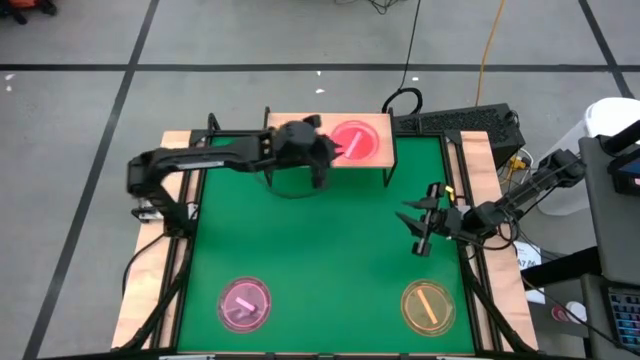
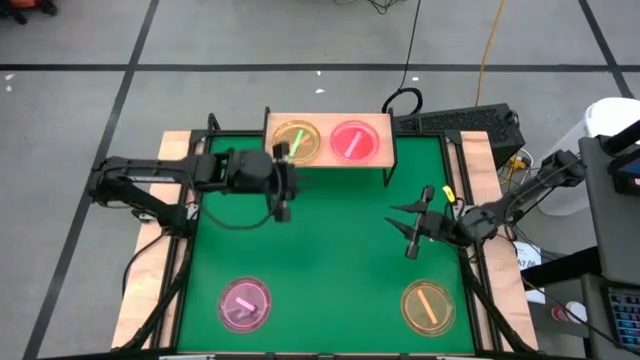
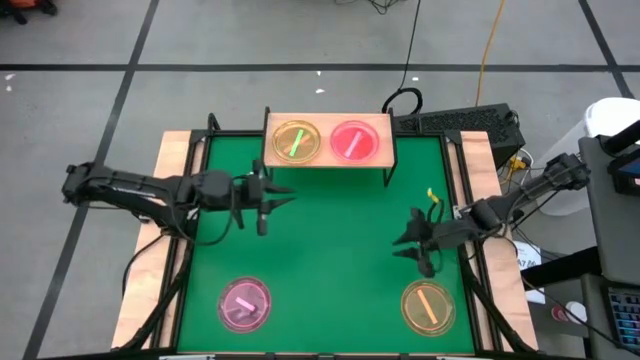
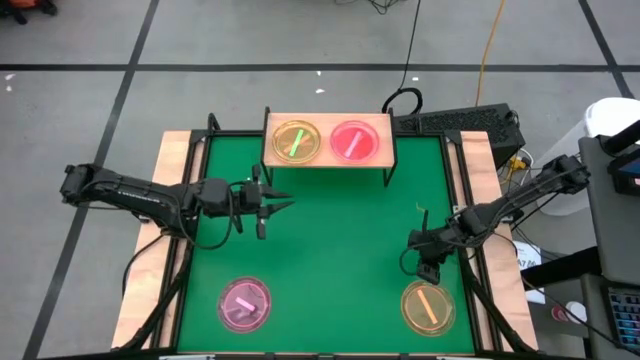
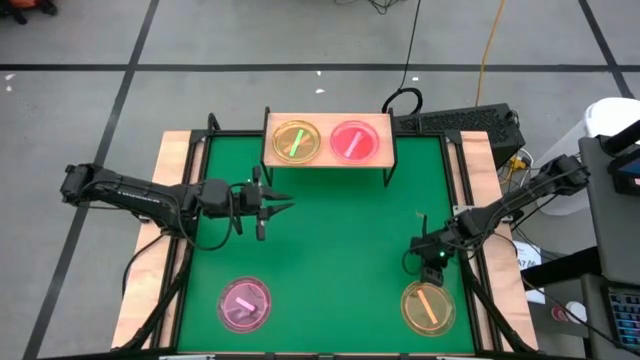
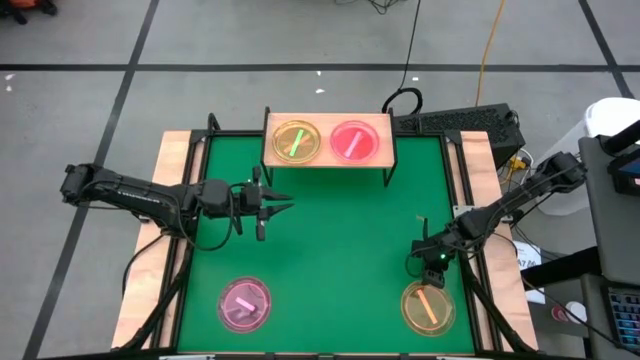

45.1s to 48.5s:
Task: Place and stack plates onto a shelf
Stack the orange plate on top of the pink plate on the shelf

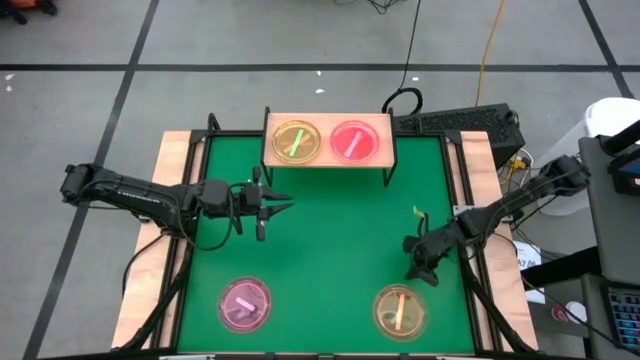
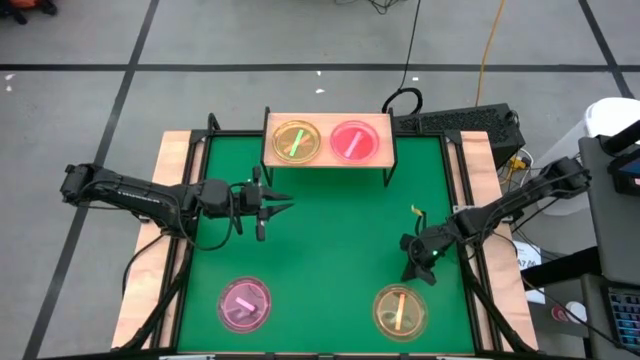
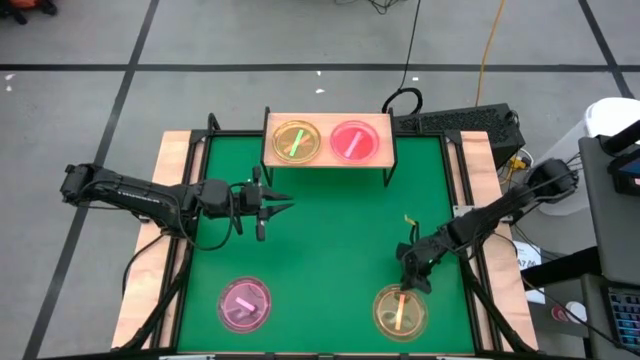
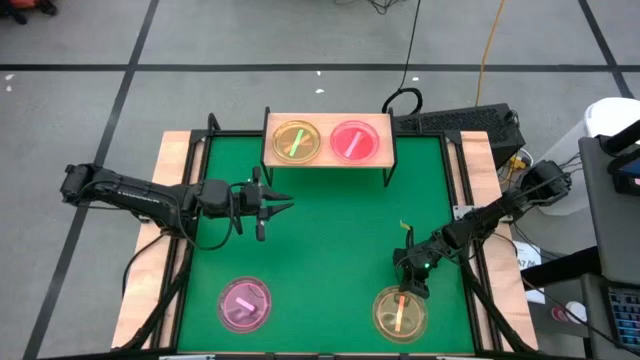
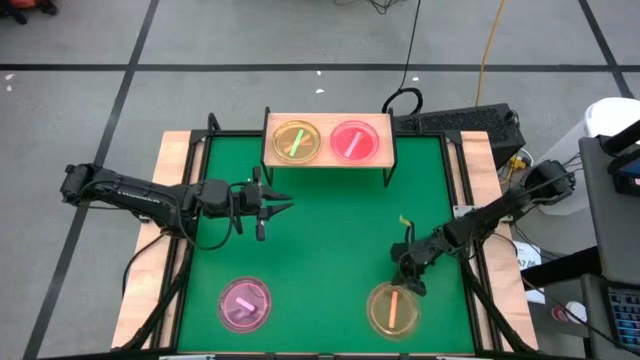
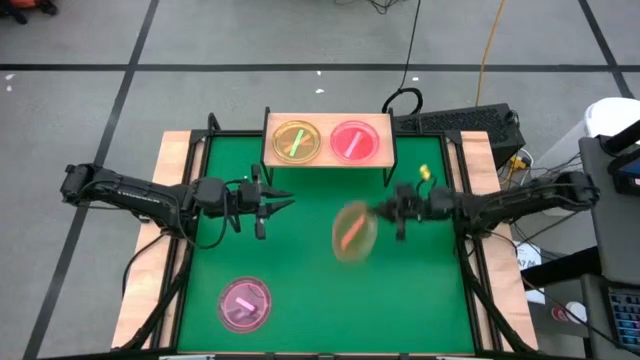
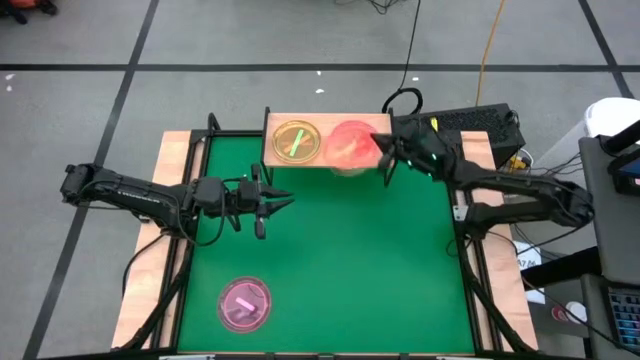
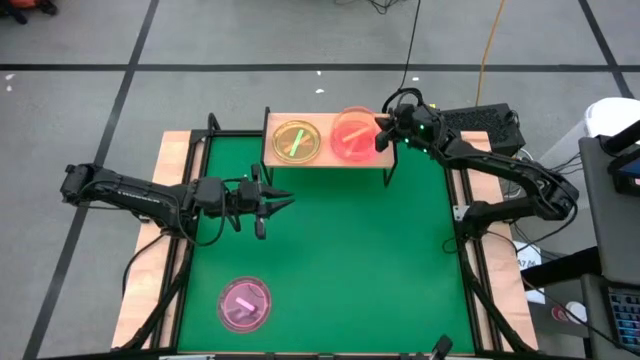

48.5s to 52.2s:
Stack the orange plate on top of the pink plate on the shelf

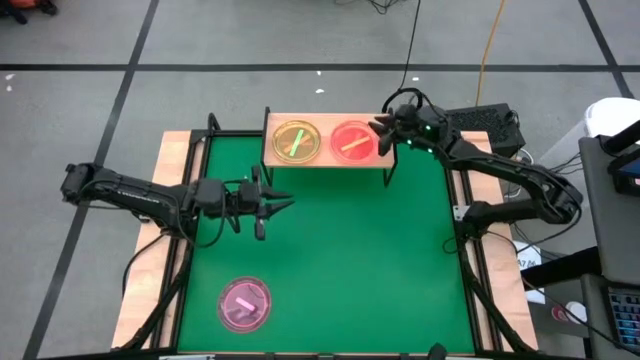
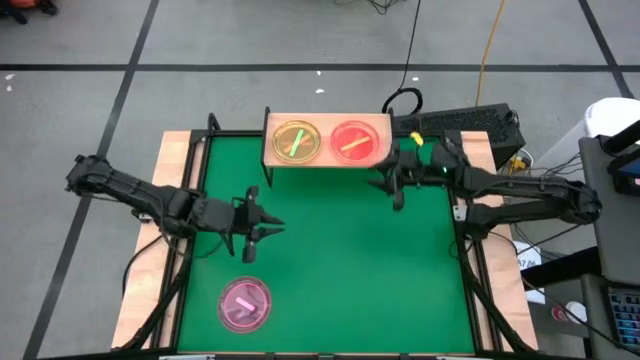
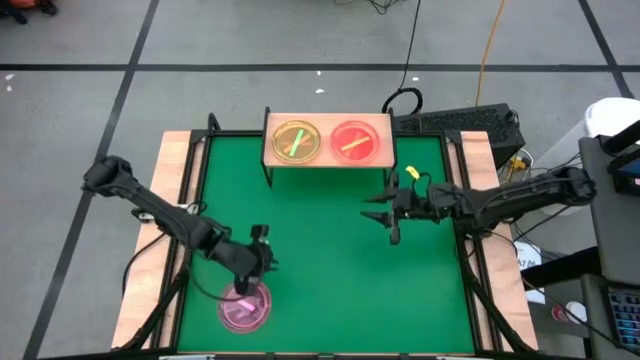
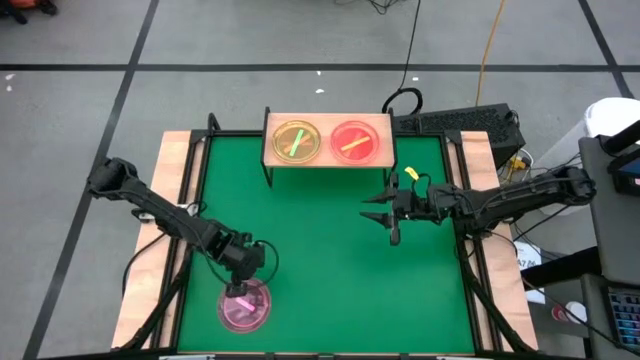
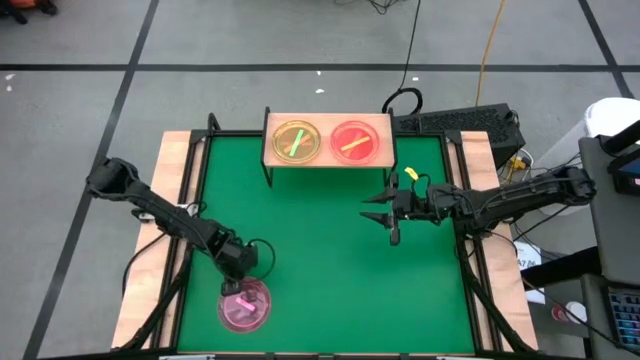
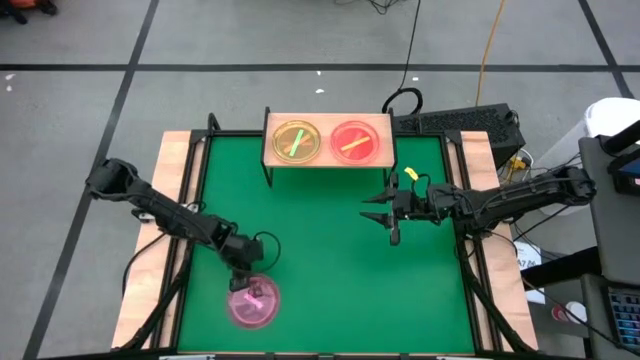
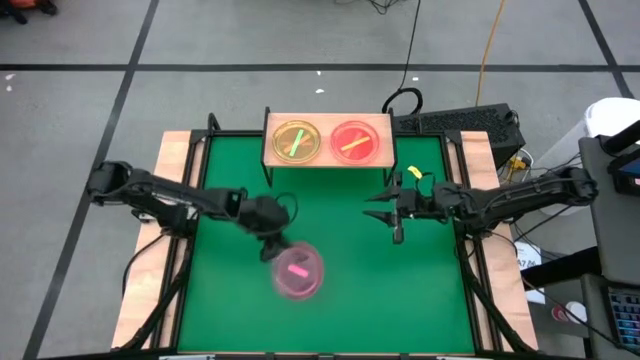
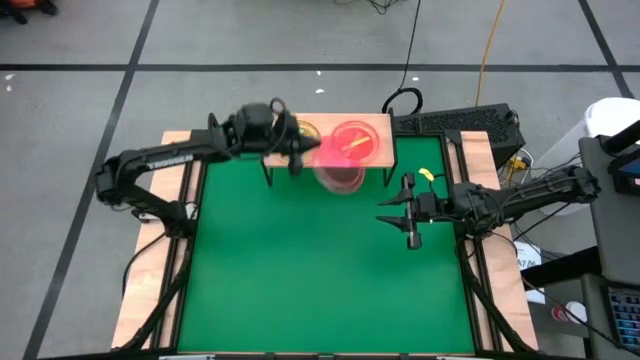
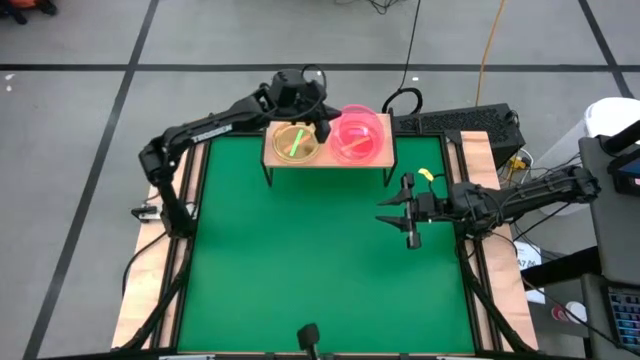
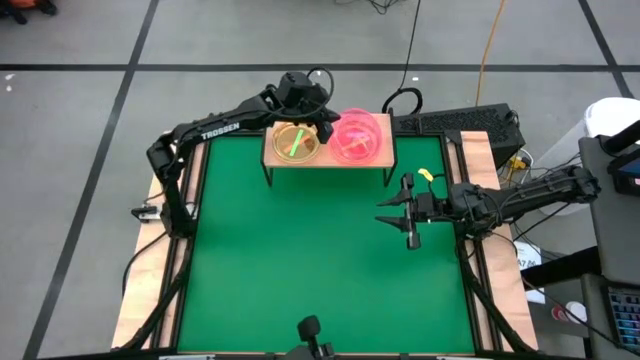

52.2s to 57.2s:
Stack the pink plate on top of the orange plate on the shelf

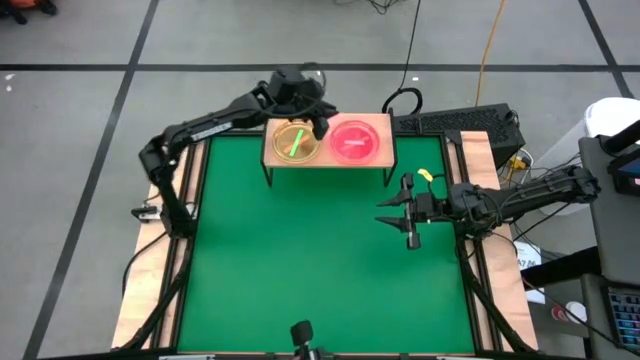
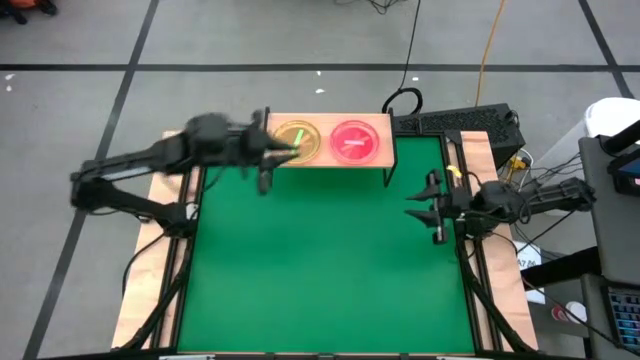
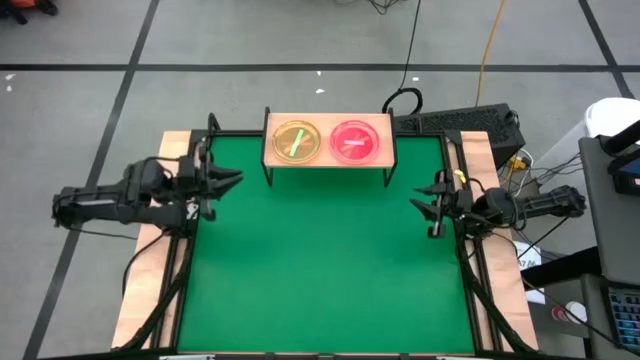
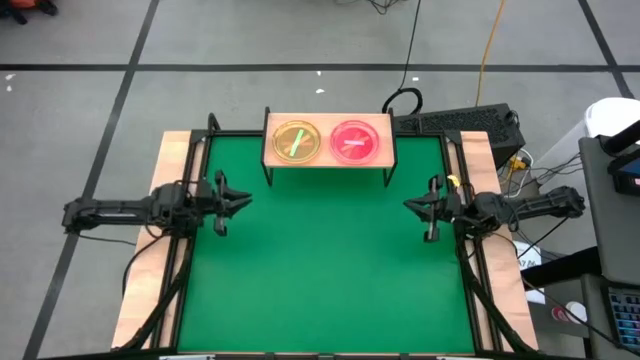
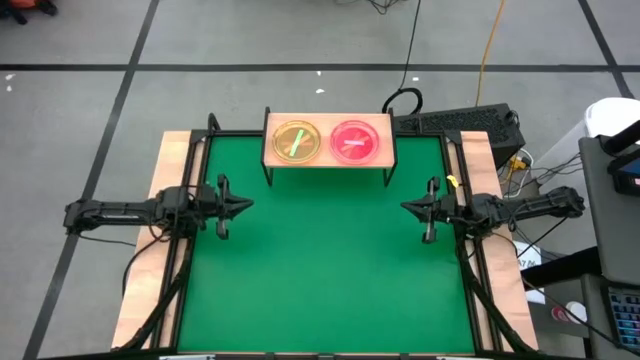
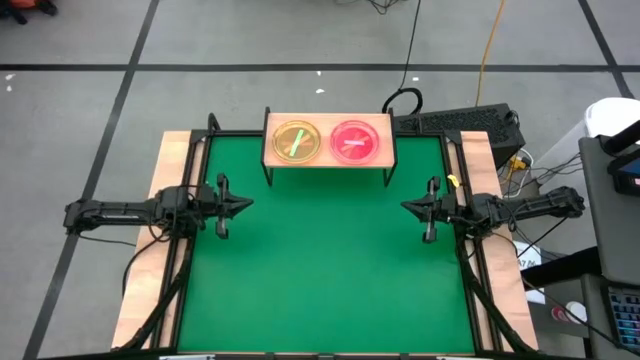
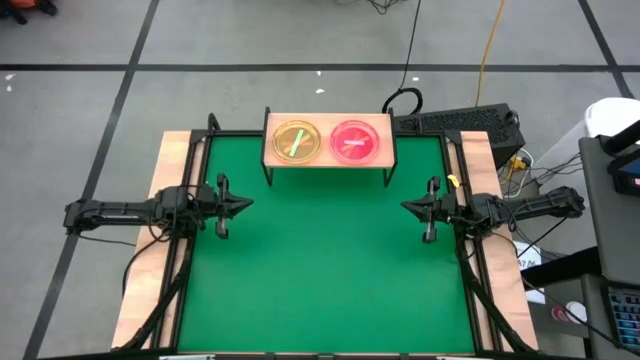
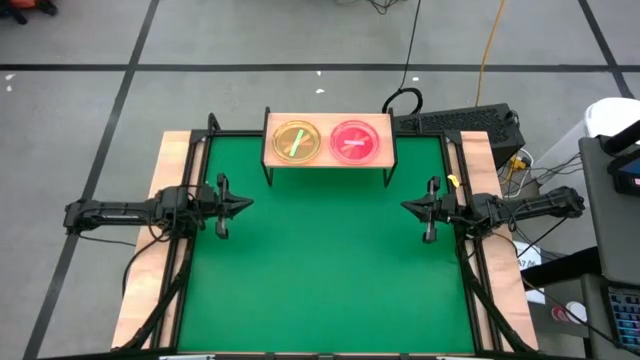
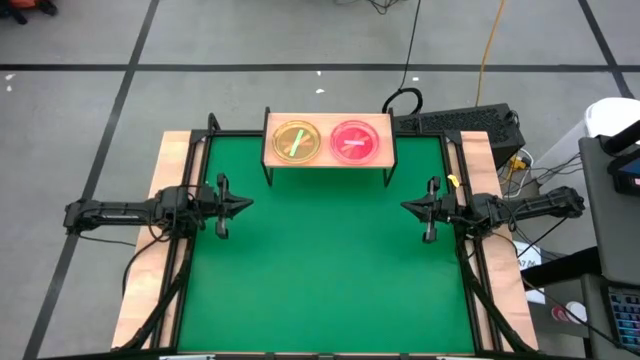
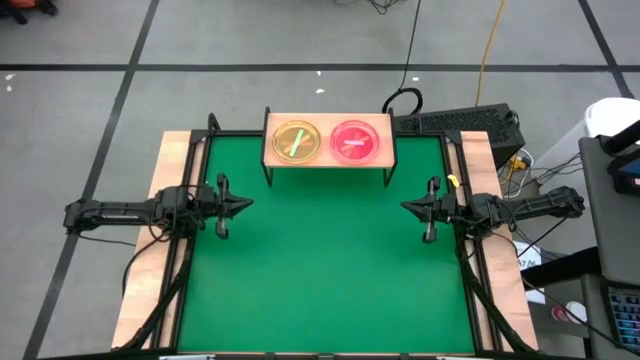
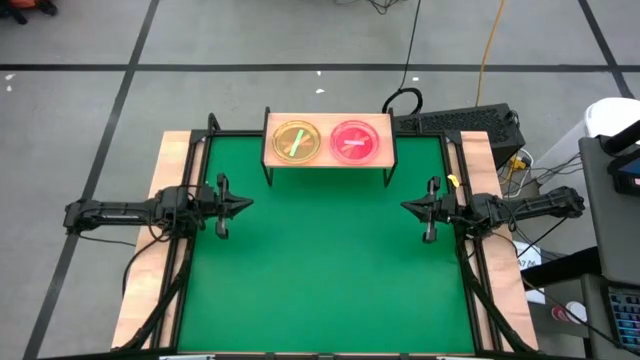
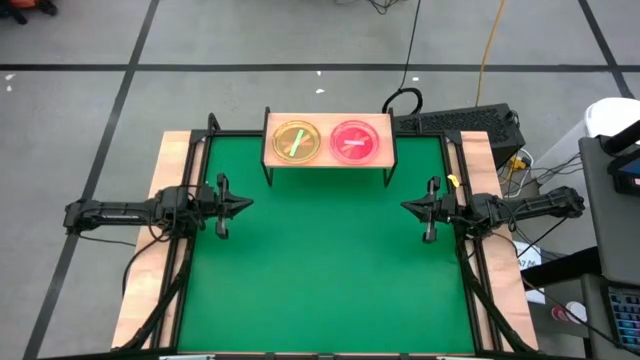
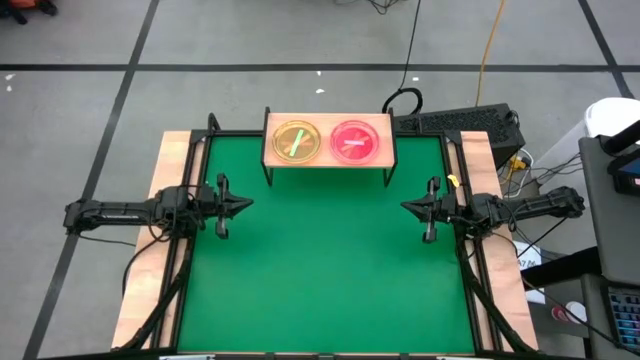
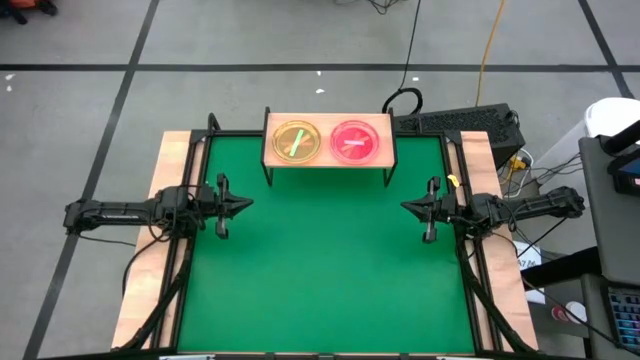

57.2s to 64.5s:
Return to Home Position

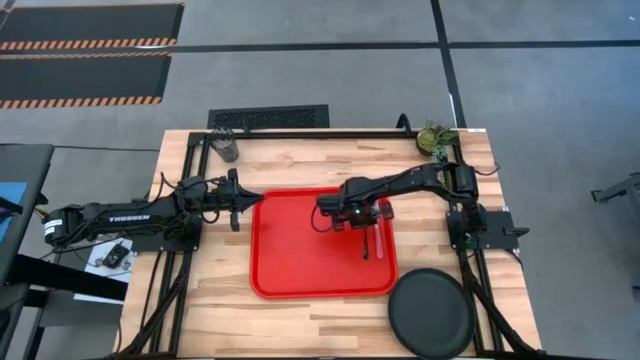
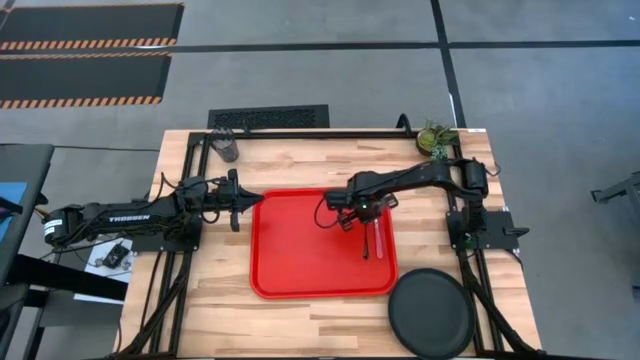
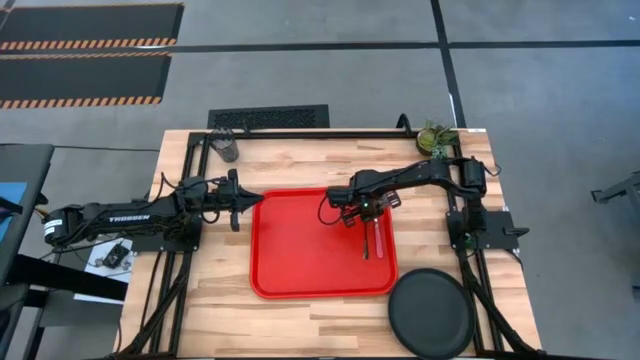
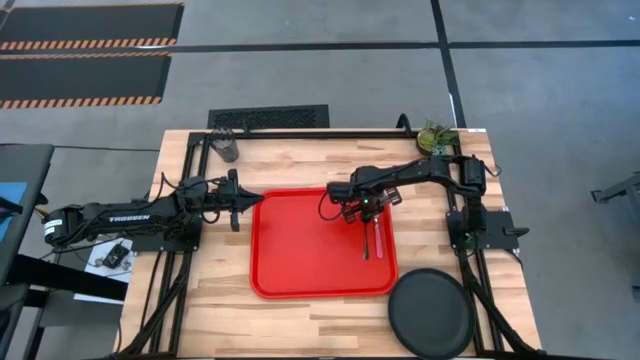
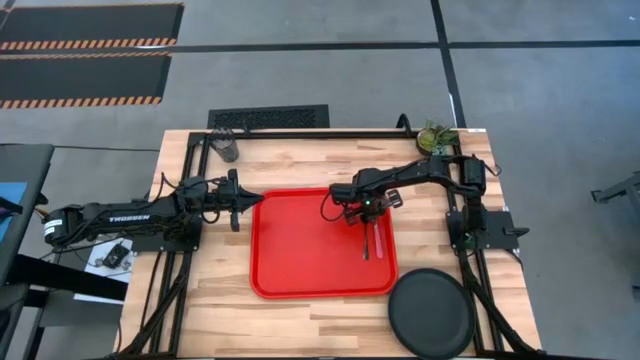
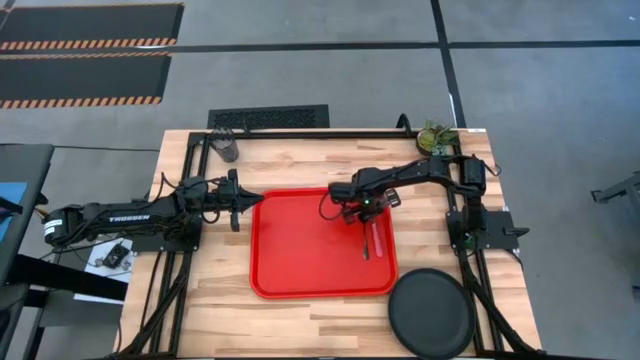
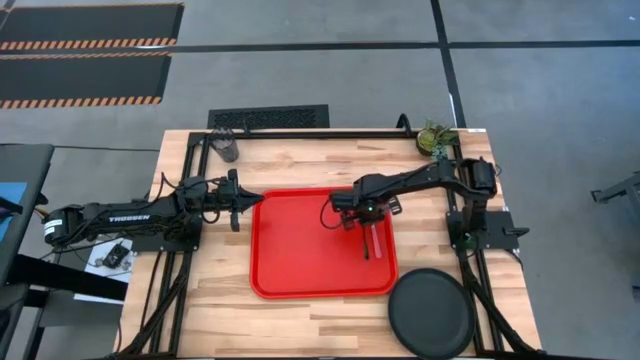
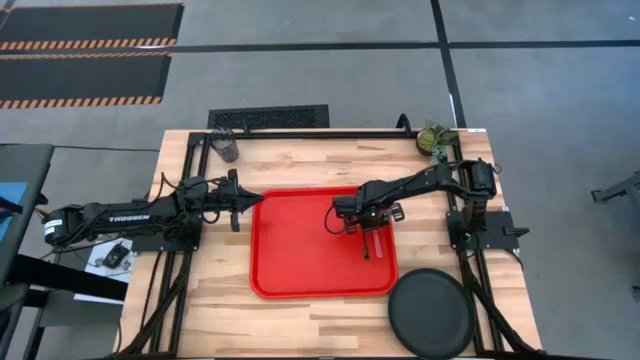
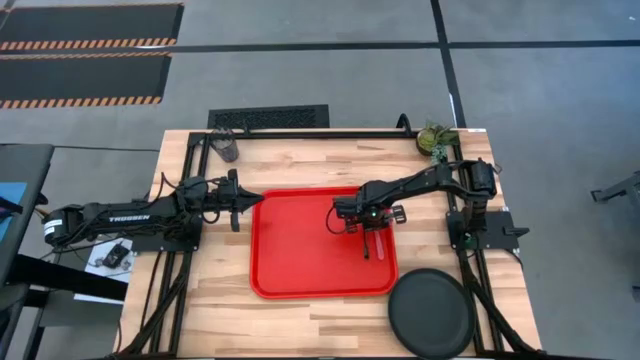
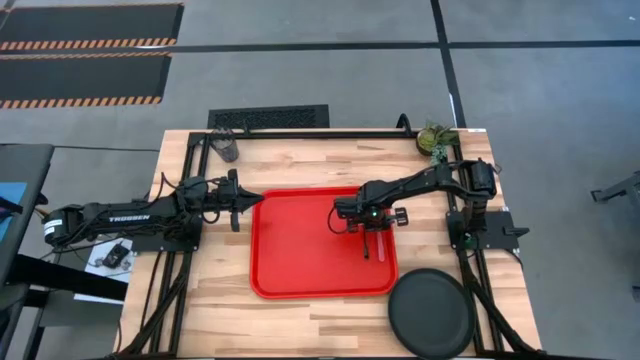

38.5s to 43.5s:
Task: Pick and place plate/cup/fork/spoon on tray
Adjust the red fork on the red tray
